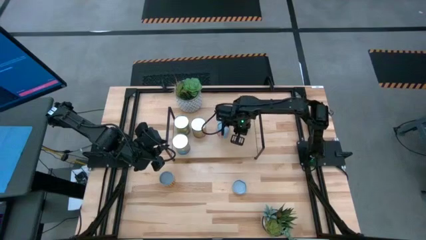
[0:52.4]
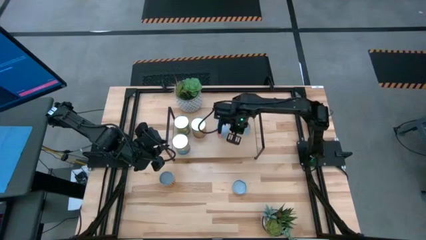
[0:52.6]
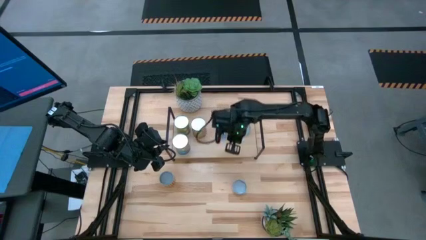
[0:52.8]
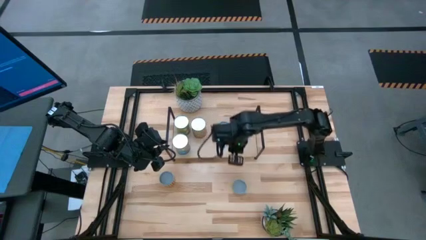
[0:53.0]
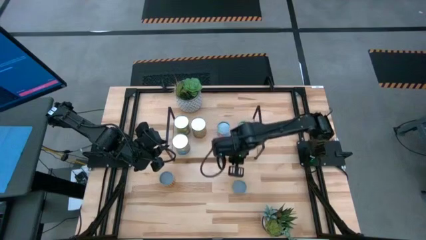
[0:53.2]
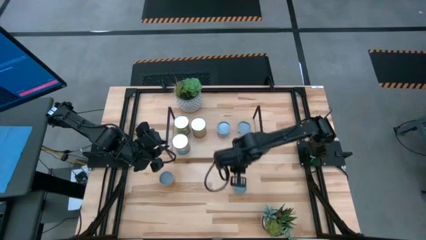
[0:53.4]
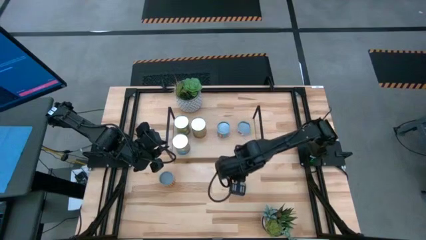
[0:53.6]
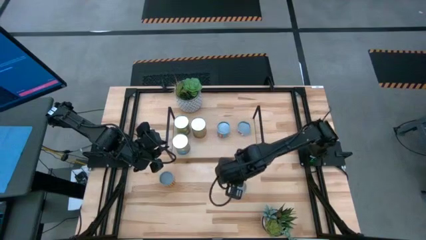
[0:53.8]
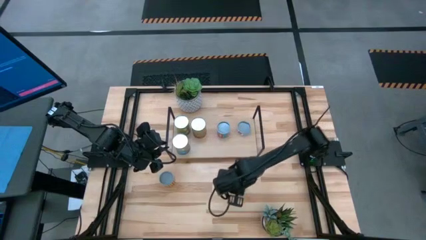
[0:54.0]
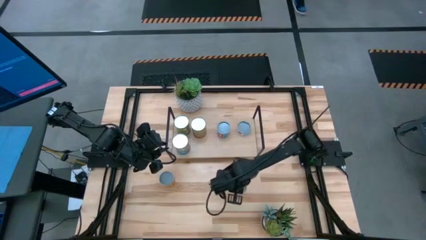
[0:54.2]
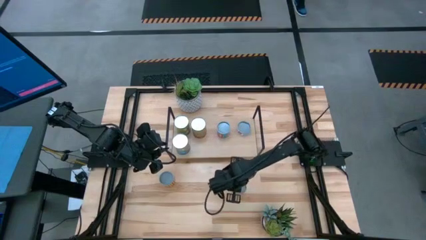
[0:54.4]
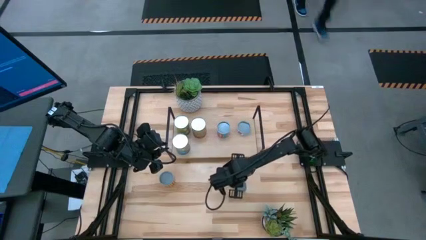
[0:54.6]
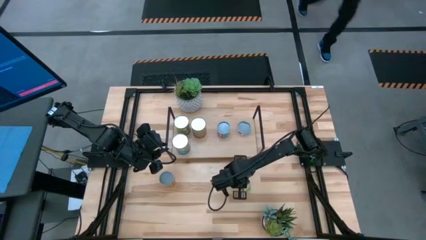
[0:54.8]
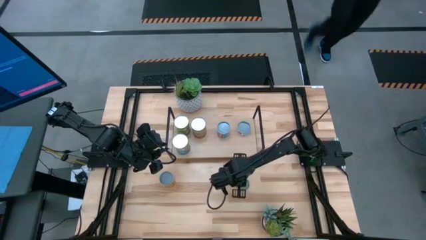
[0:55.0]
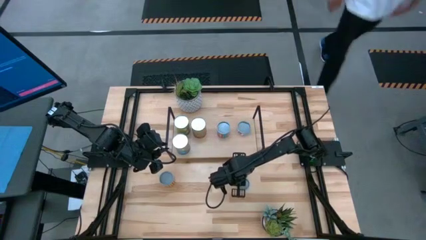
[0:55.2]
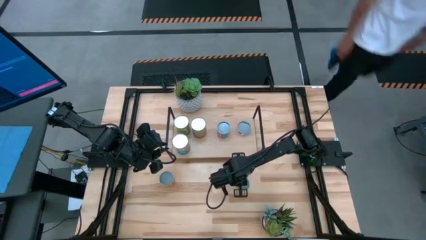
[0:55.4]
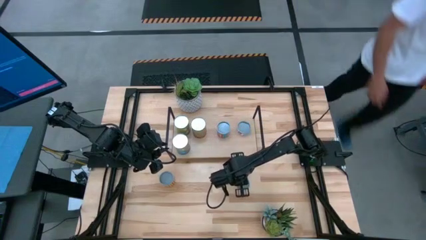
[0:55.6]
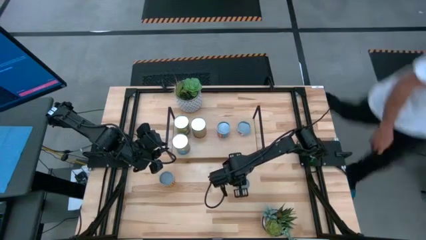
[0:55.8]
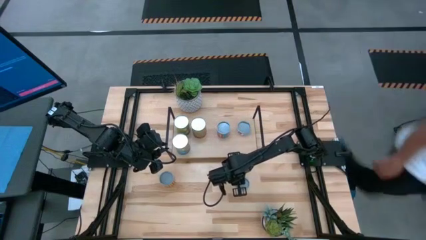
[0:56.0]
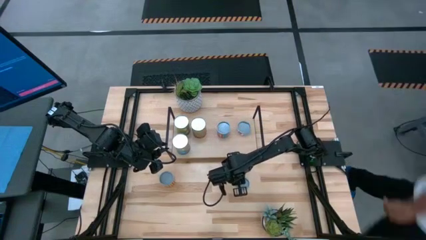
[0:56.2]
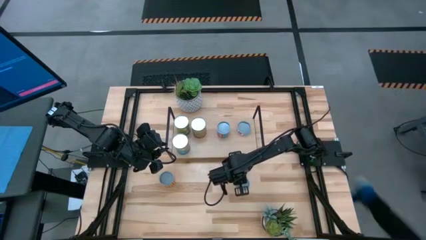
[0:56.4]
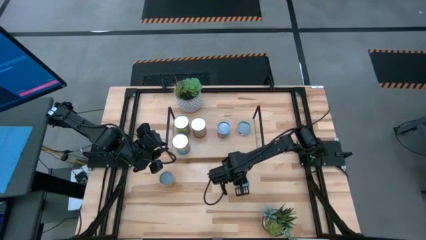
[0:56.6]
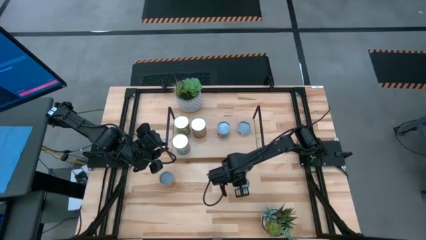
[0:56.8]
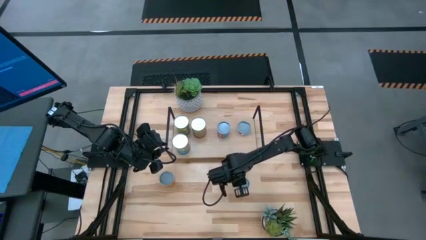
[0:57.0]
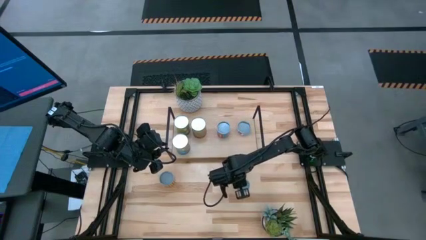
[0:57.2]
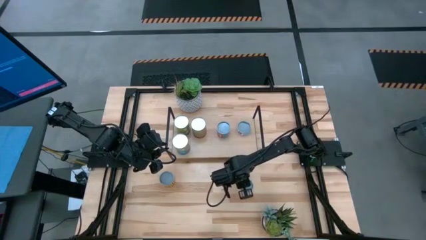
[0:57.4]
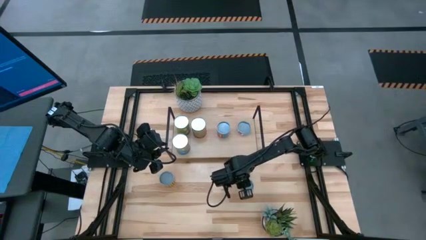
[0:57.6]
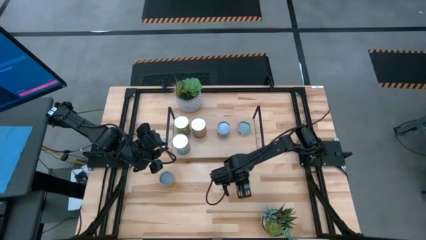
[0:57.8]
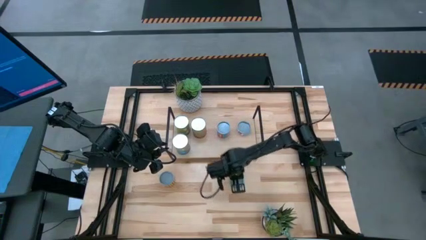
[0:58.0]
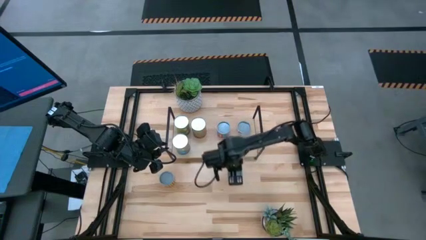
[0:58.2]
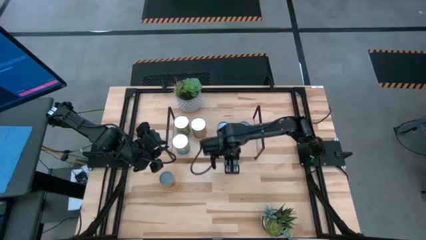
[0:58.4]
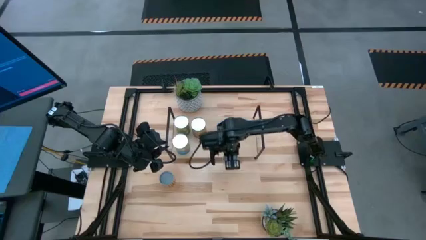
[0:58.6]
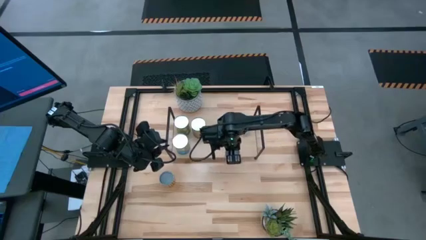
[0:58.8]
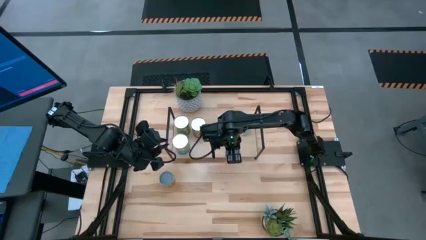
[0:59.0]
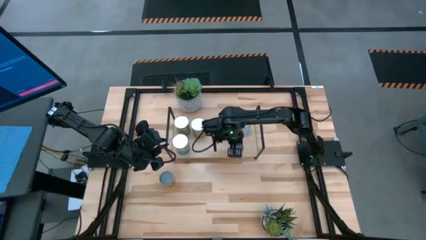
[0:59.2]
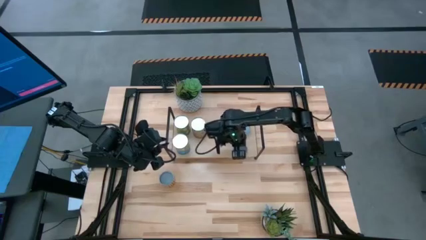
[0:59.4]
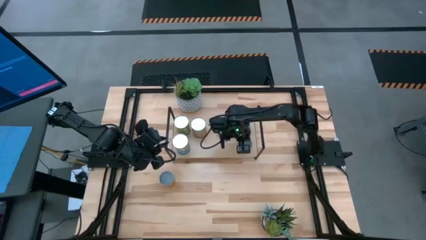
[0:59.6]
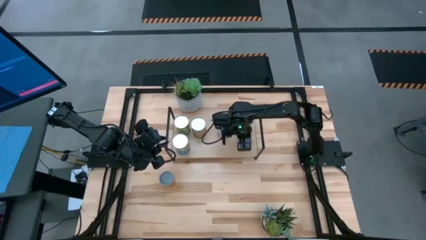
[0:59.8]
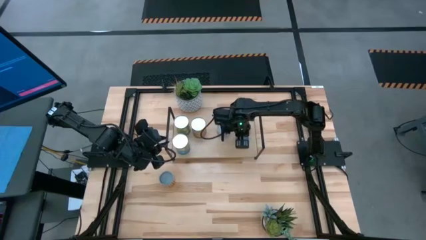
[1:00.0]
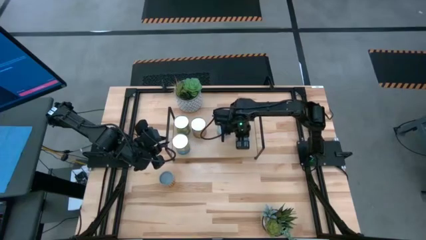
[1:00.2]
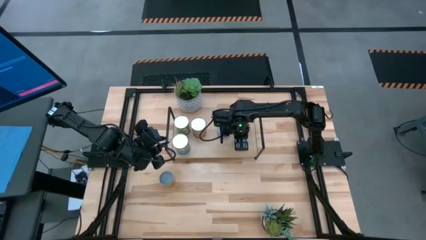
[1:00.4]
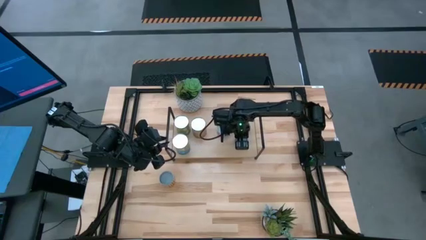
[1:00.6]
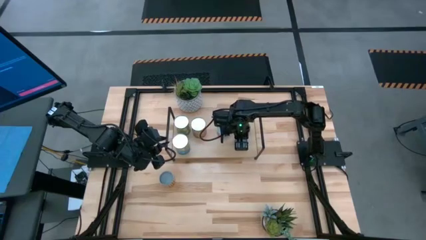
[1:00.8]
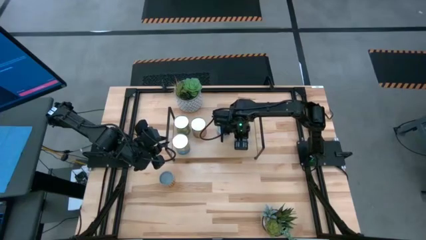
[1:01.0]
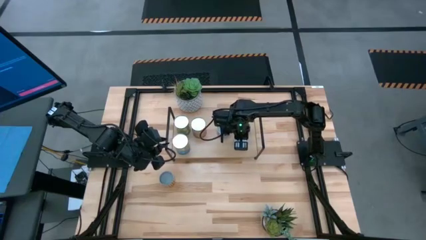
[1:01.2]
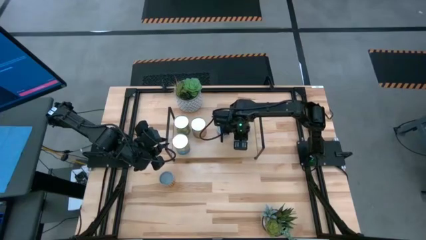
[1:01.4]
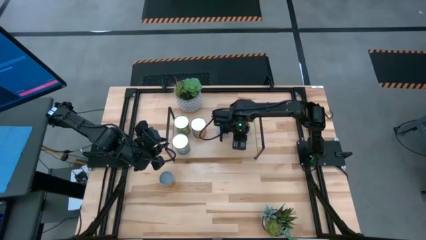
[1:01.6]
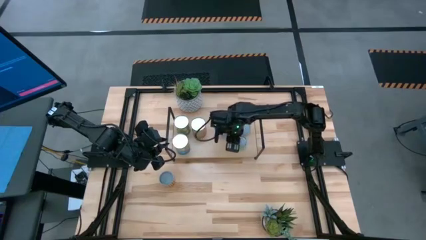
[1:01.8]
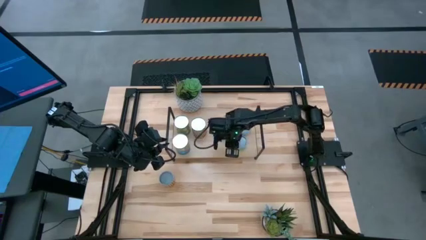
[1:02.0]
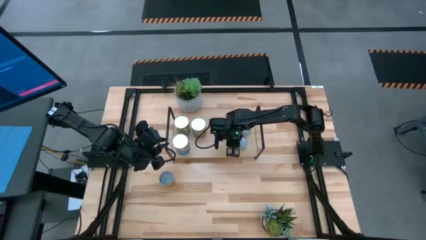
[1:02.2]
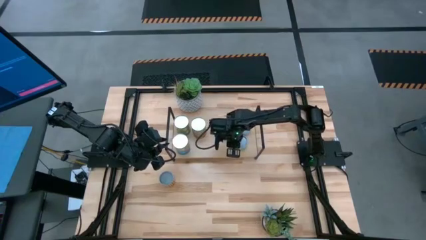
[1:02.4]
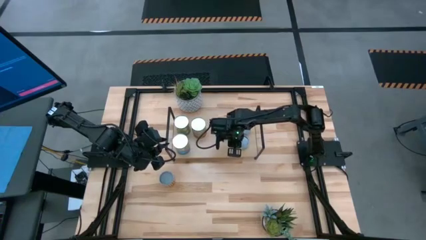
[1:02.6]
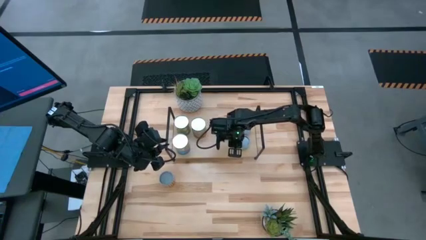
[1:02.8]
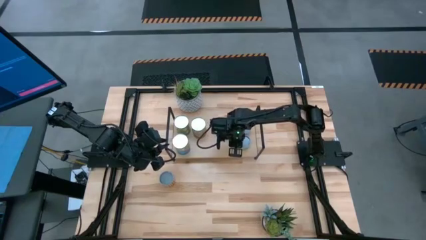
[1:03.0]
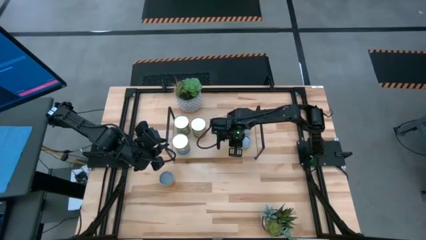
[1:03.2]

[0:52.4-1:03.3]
Task: Pick and place cans onto a shelf
Put the canned mushroom on the shelf
